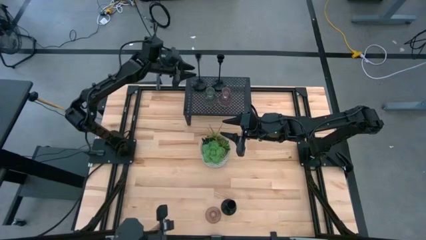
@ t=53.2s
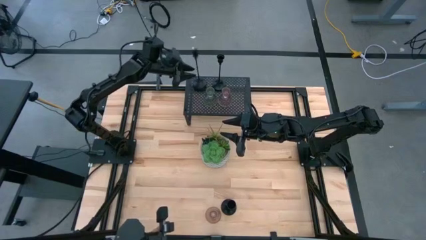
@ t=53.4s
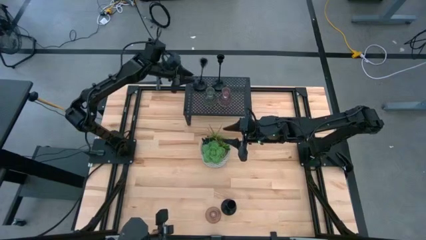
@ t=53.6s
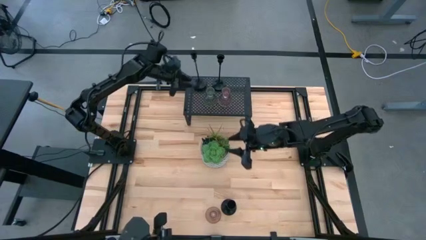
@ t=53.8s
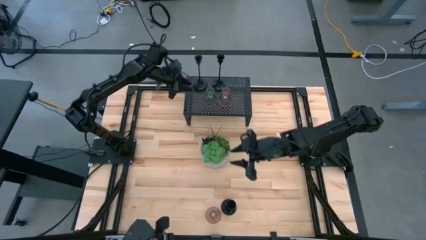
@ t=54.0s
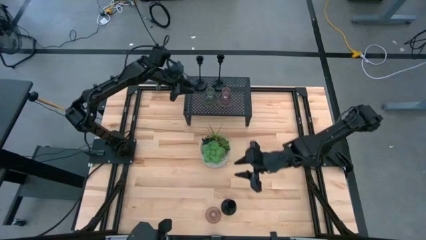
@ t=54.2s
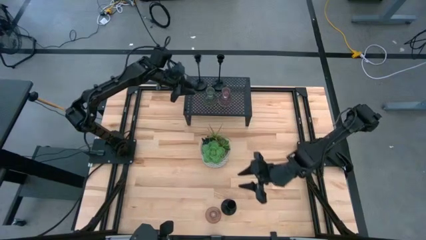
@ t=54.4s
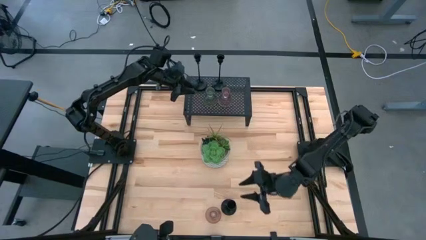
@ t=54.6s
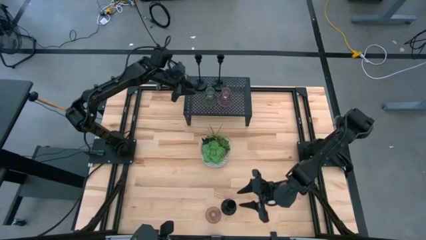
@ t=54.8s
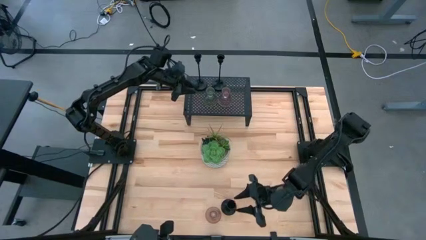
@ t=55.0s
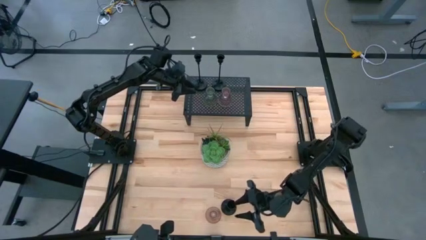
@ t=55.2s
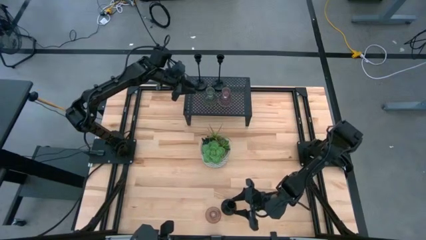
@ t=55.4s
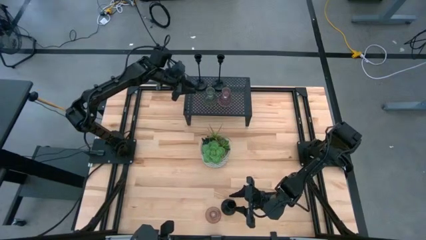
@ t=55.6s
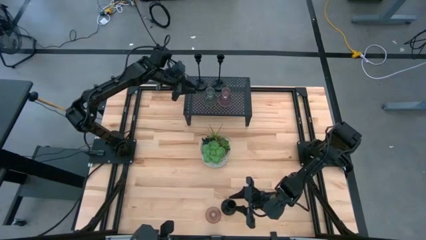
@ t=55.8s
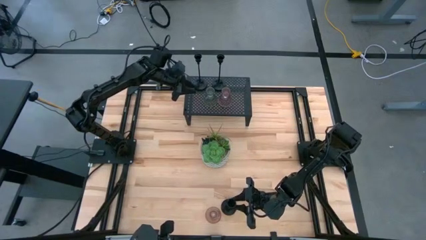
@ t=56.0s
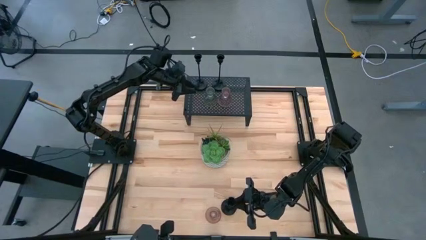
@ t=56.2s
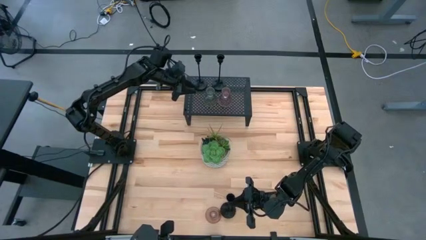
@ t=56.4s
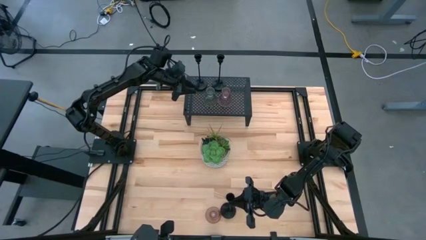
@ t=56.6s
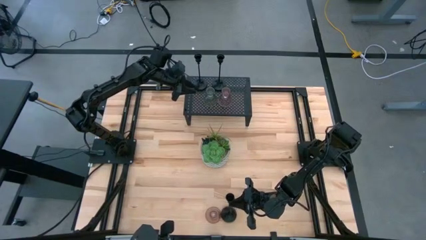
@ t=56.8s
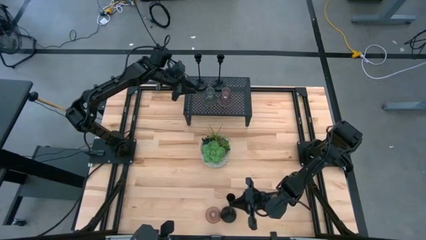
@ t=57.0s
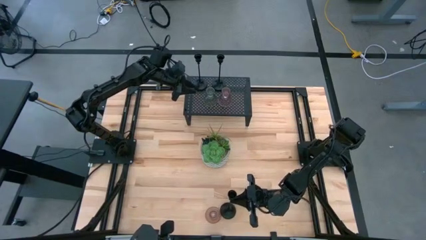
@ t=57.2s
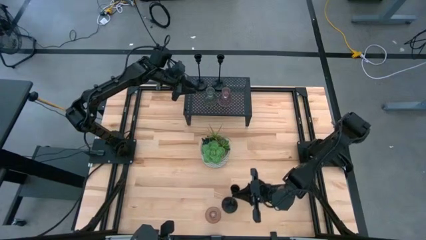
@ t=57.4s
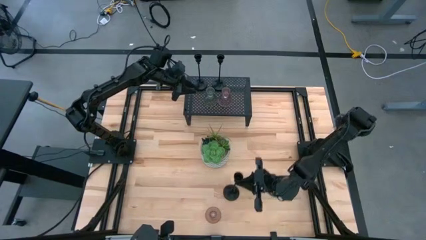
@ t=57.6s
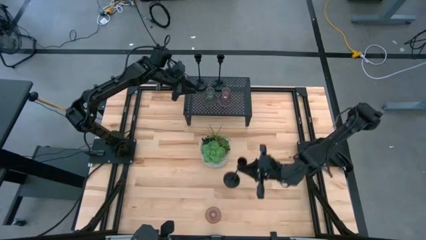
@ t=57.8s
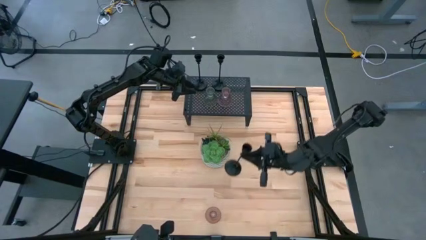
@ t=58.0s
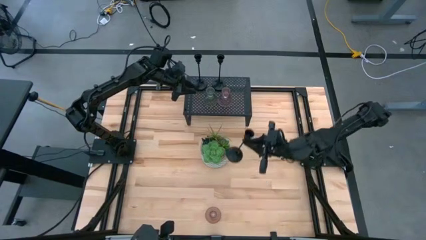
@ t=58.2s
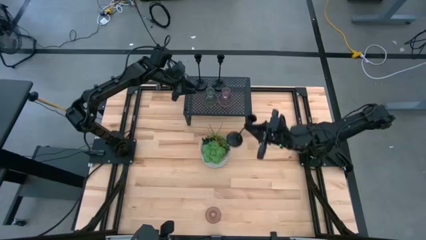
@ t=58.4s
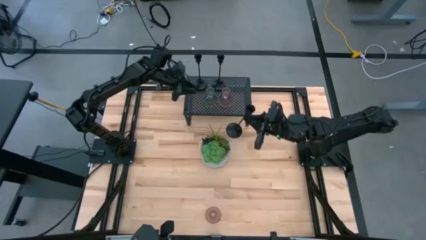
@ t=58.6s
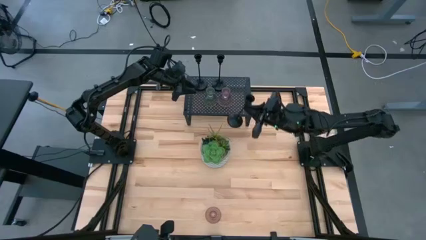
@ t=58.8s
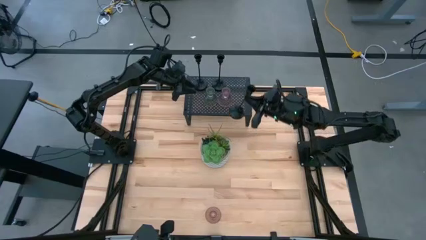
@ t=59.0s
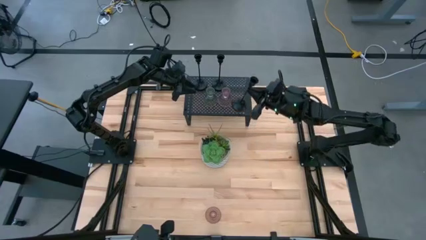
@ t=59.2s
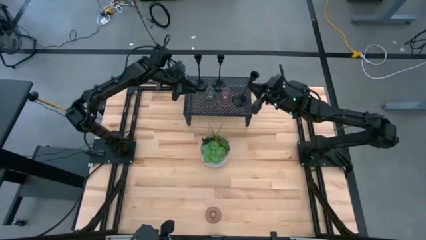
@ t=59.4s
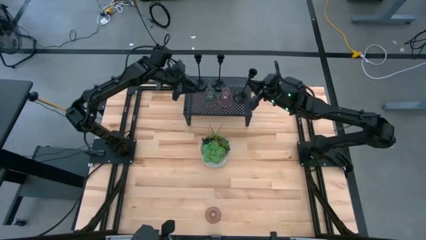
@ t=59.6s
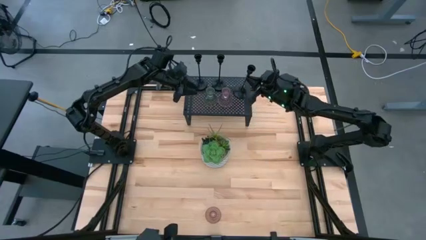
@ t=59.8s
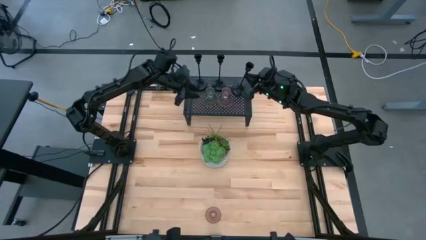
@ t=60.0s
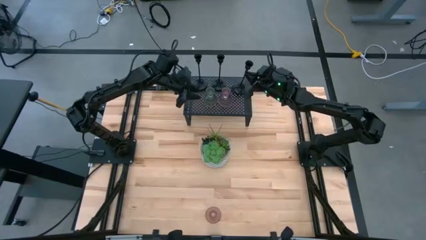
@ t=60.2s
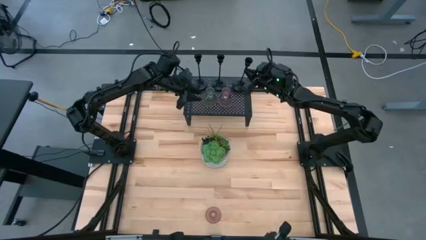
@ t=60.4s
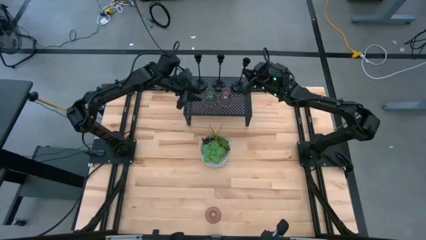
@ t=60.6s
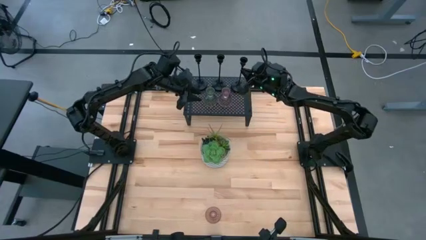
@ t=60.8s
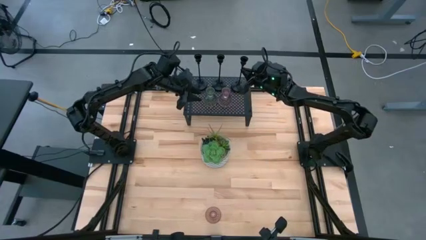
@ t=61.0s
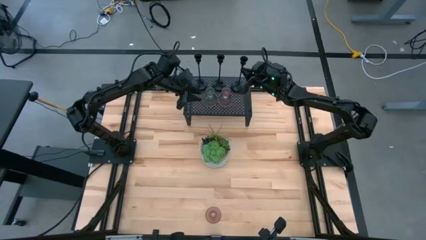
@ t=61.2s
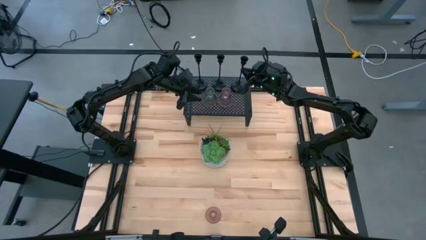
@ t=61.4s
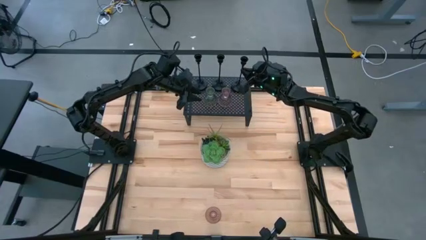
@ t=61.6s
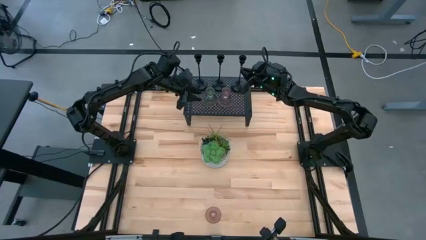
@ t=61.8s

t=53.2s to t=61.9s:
Task: Pick & Place candle stick holders
Put the black candle holder on the shelf aligned with the other black candle holders

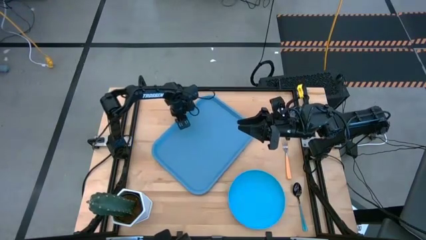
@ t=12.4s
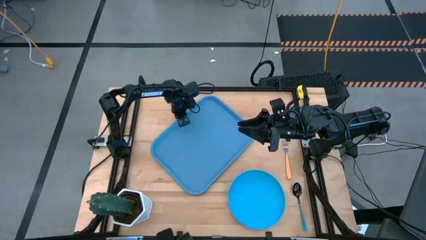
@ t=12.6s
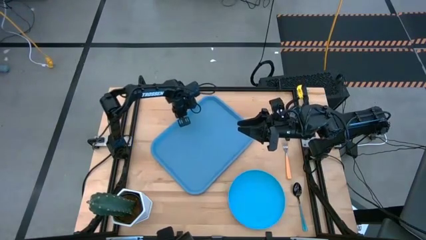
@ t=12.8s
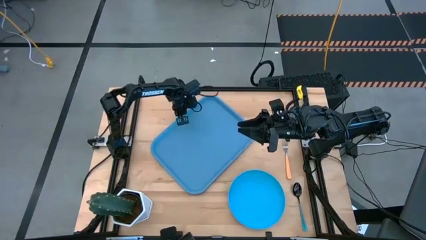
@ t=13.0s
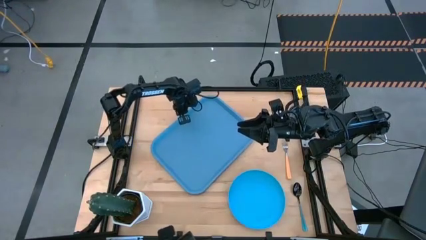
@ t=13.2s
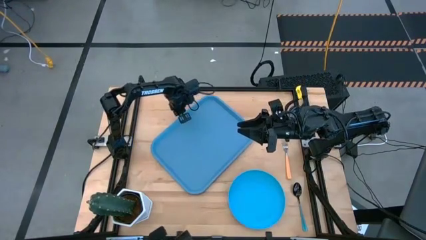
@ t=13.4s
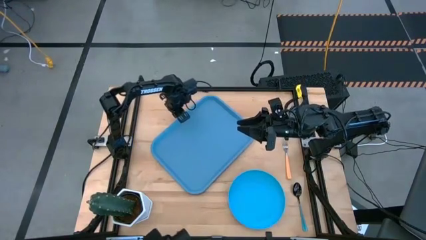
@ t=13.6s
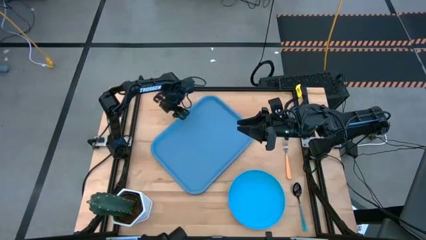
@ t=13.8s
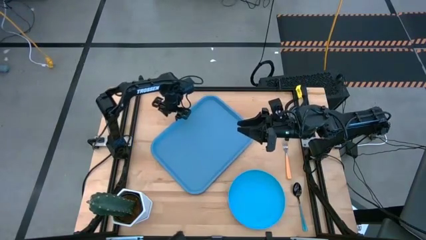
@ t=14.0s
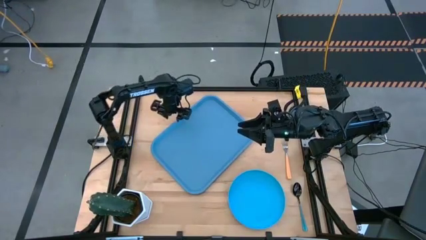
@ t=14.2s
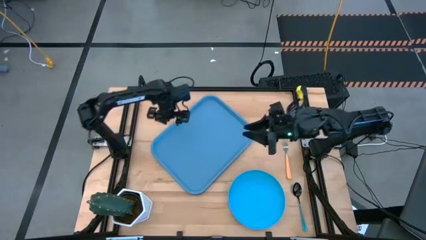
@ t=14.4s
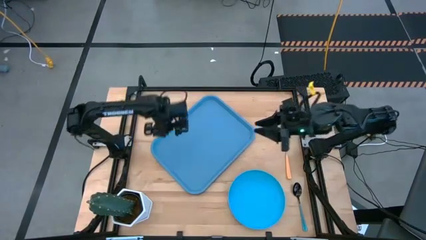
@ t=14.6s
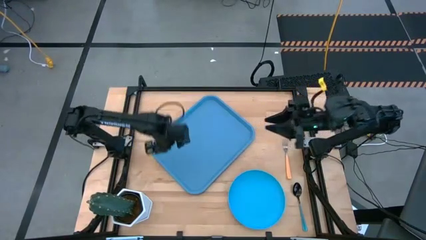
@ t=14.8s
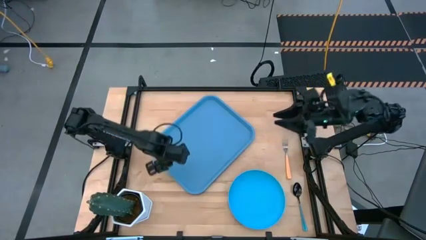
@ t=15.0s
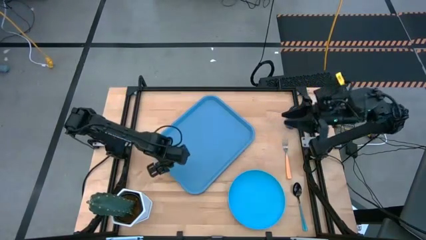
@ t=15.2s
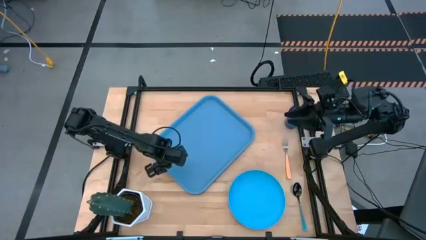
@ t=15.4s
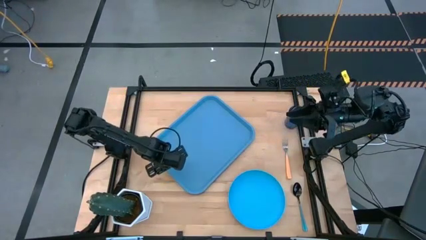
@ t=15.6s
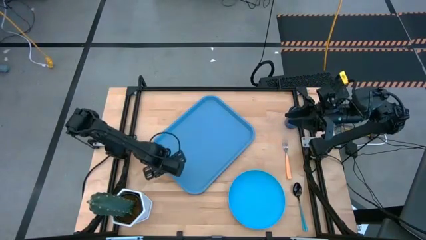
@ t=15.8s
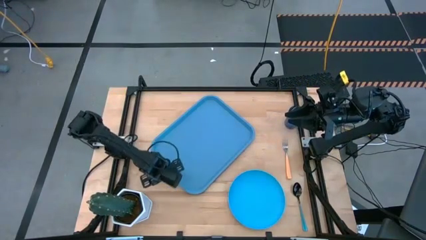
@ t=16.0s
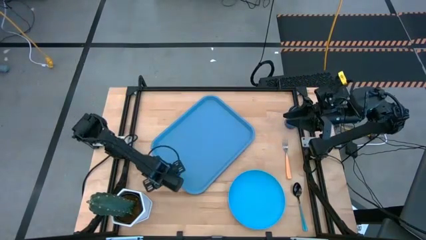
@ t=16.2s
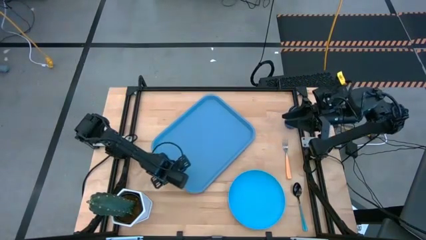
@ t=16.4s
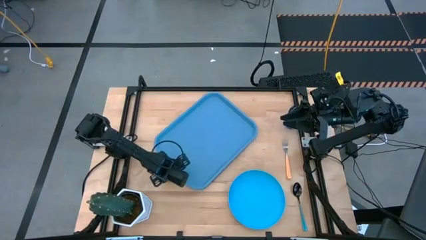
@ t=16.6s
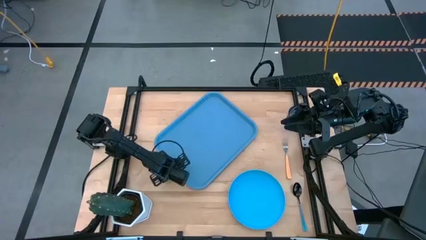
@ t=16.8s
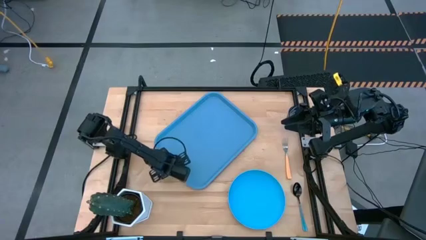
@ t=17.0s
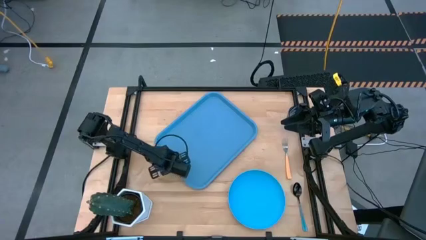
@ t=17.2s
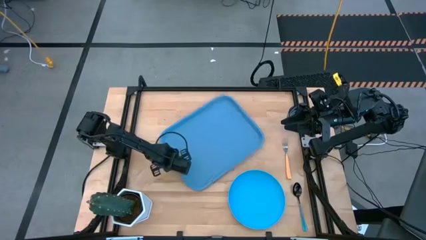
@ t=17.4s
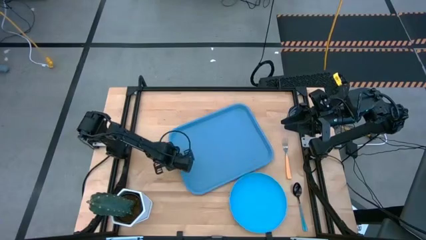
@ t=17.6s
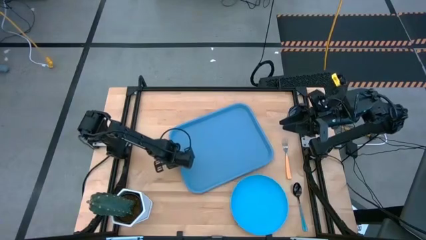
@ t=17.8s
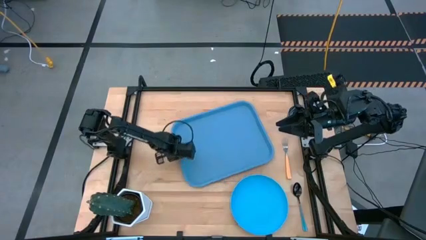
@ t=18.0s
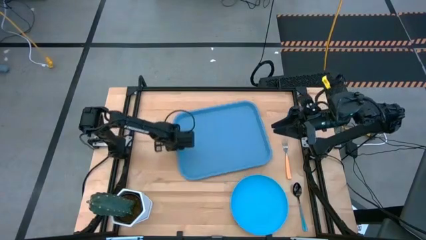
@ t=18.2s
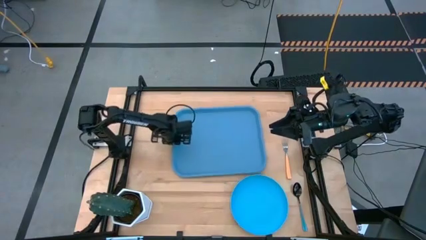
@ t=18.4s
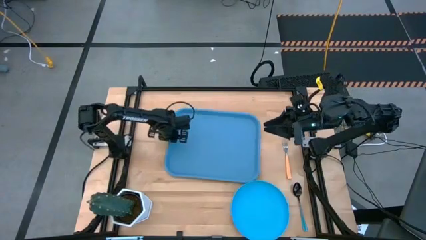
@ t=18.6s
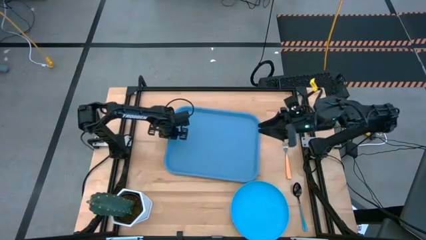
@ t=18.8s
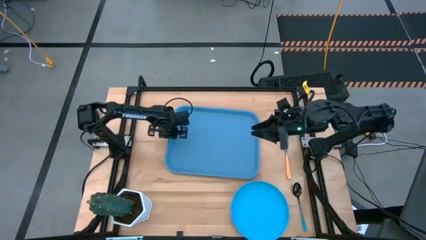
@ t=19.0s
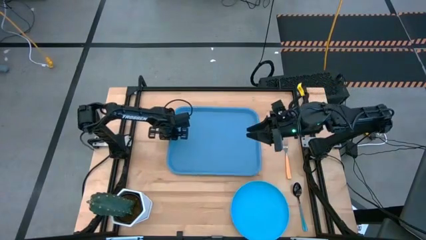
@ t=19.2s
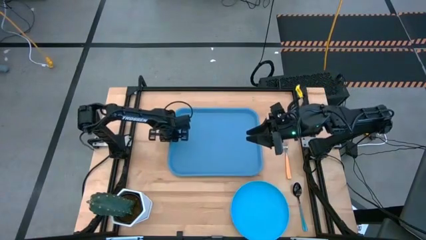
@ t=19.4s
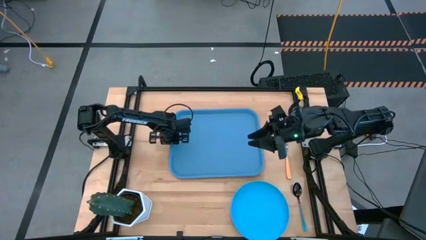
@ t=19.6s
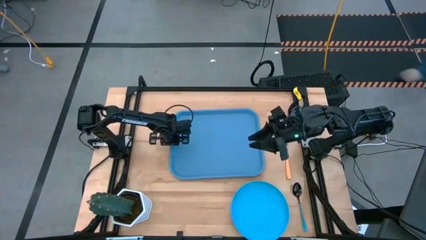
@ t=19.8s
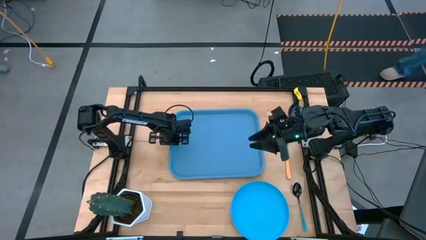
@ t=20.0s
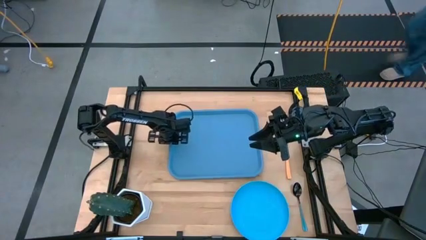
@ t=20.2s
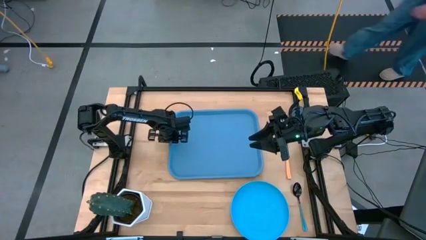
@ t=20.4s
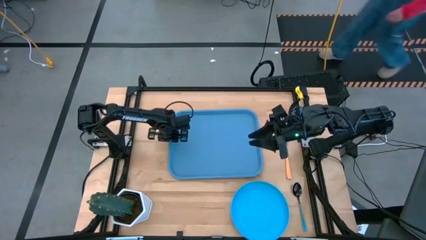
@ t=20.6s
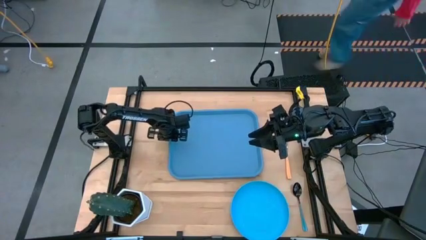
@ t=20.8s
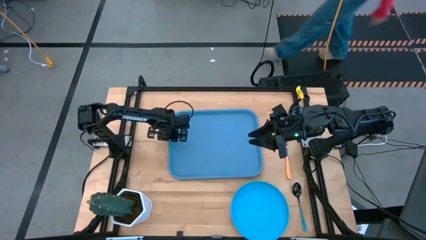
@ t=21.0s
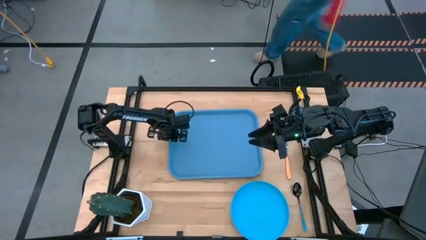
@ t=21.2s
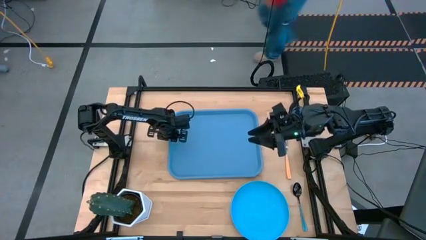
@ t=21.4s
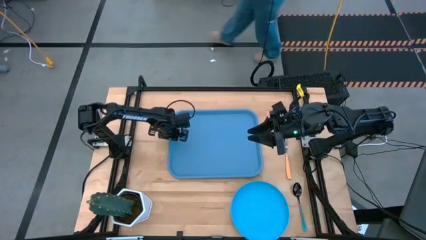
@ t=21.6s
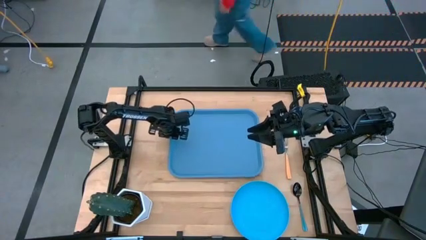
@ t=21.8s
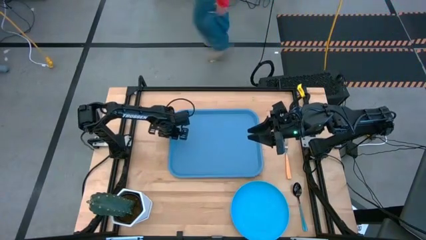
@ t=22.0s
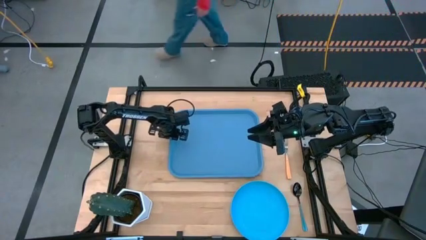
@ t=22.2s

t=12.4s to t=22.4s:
Task: Pick and place plate/cup/fork/spoon on tray
Prepare the blue serving tray on the table
